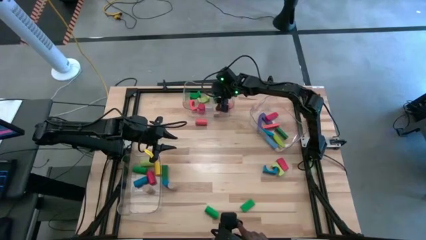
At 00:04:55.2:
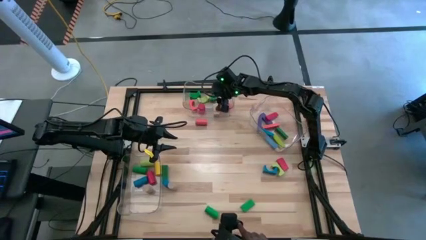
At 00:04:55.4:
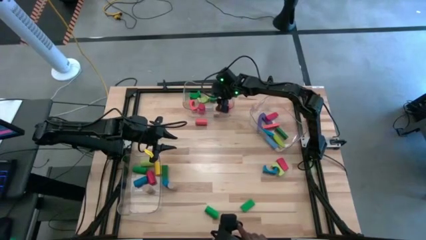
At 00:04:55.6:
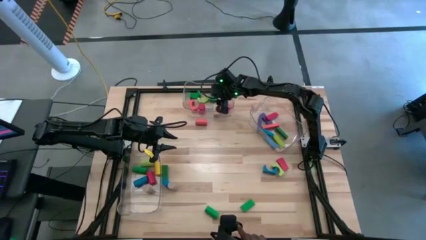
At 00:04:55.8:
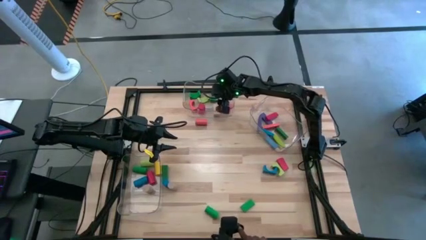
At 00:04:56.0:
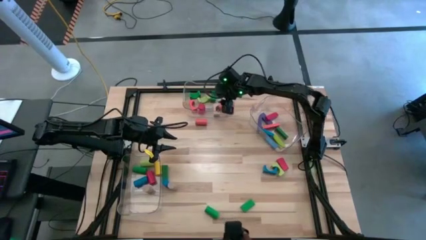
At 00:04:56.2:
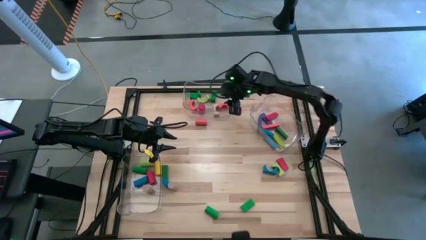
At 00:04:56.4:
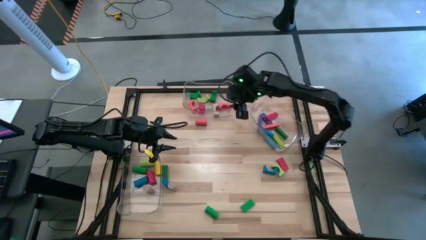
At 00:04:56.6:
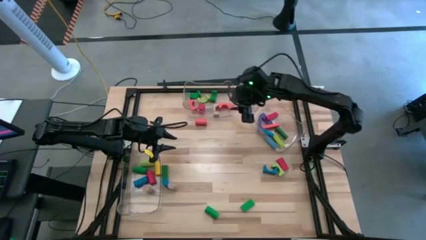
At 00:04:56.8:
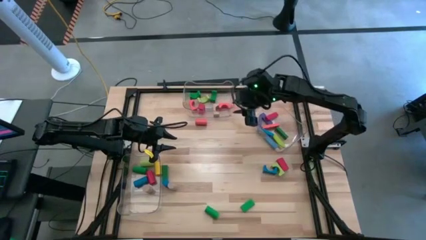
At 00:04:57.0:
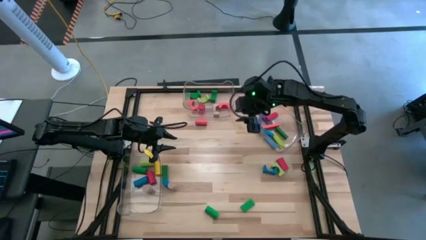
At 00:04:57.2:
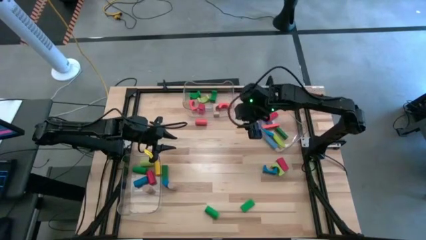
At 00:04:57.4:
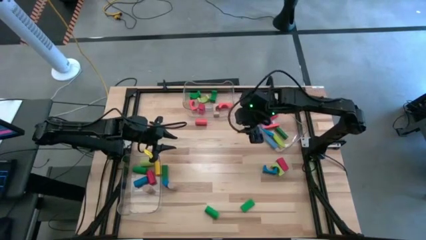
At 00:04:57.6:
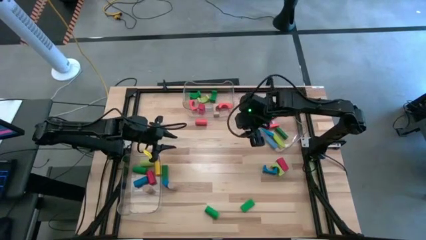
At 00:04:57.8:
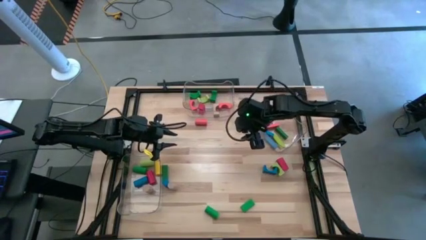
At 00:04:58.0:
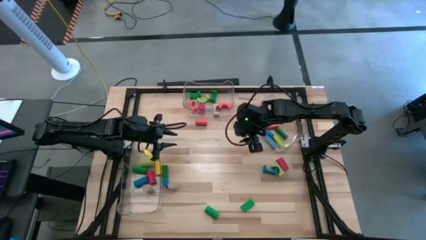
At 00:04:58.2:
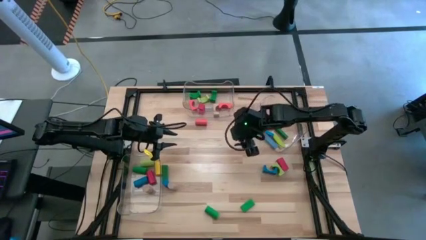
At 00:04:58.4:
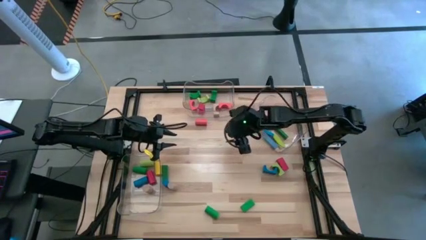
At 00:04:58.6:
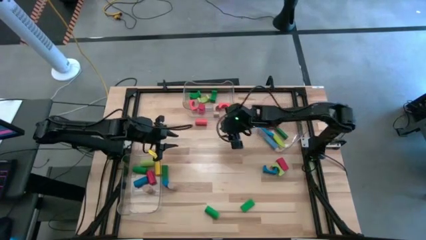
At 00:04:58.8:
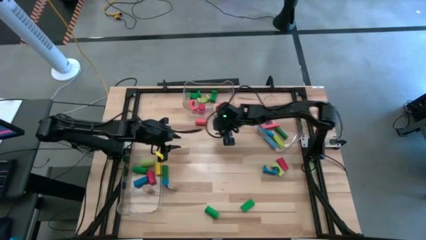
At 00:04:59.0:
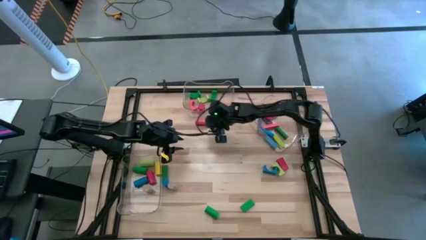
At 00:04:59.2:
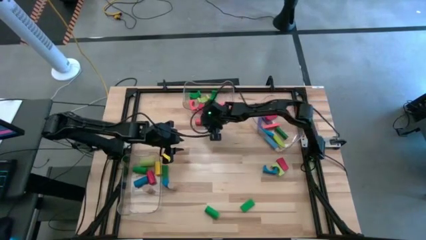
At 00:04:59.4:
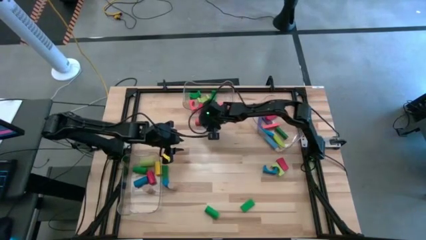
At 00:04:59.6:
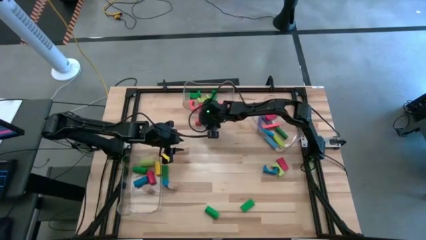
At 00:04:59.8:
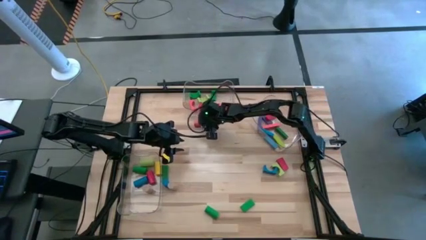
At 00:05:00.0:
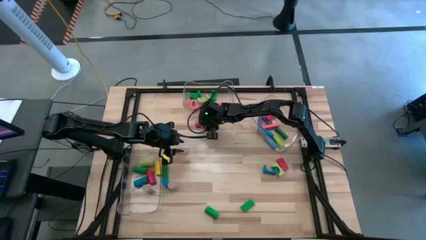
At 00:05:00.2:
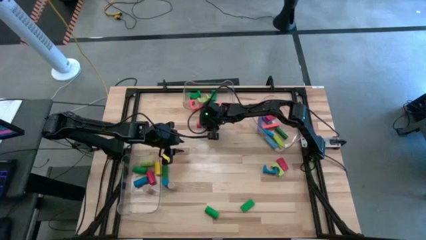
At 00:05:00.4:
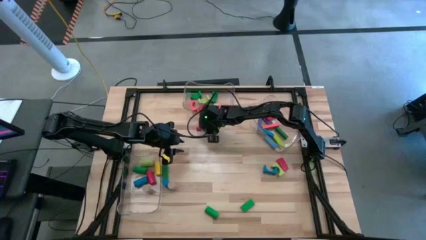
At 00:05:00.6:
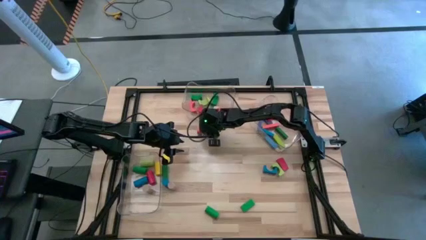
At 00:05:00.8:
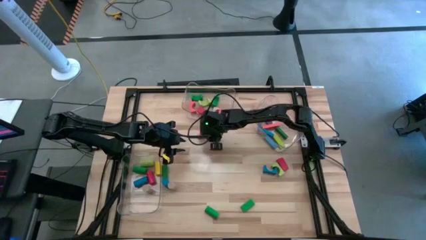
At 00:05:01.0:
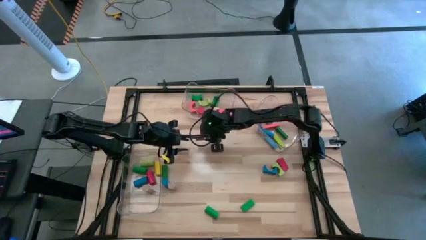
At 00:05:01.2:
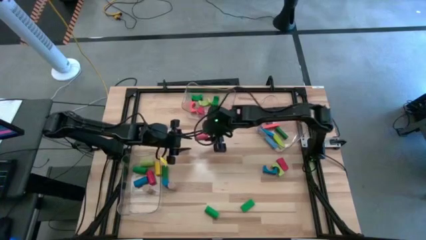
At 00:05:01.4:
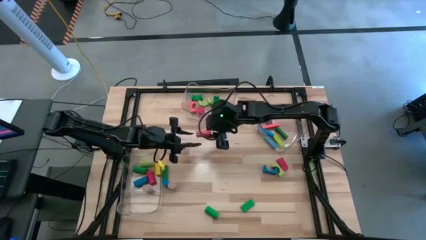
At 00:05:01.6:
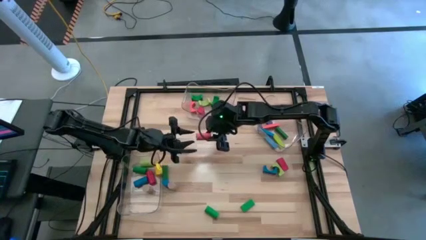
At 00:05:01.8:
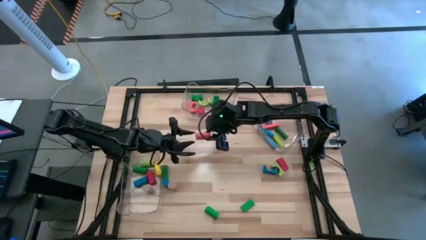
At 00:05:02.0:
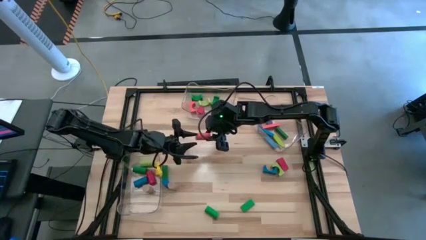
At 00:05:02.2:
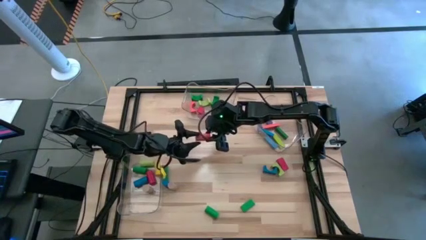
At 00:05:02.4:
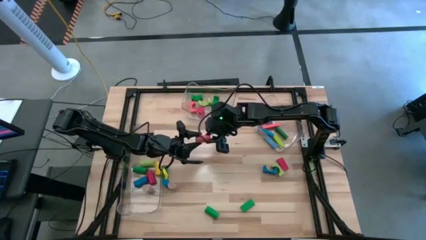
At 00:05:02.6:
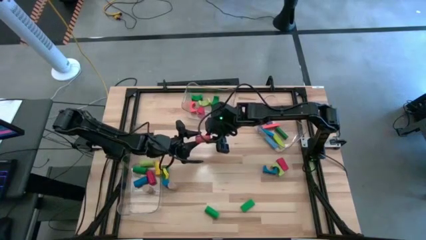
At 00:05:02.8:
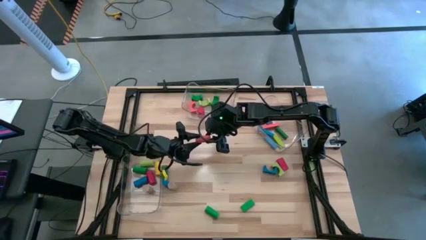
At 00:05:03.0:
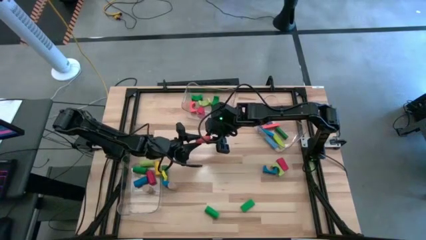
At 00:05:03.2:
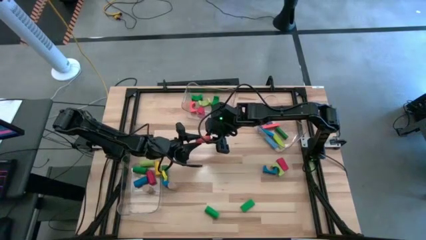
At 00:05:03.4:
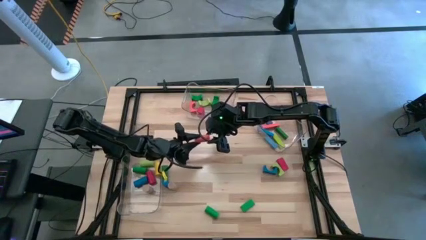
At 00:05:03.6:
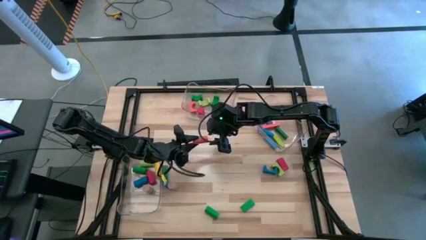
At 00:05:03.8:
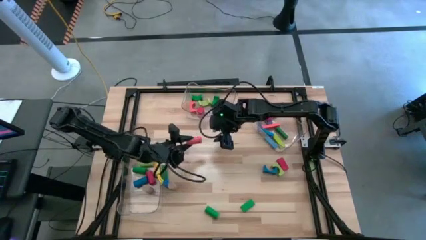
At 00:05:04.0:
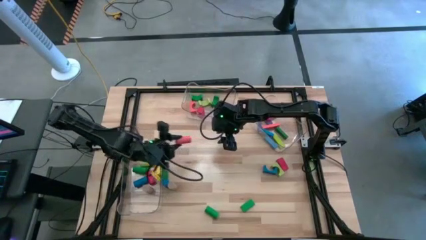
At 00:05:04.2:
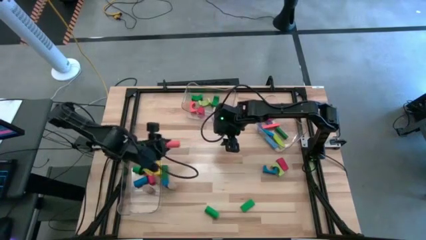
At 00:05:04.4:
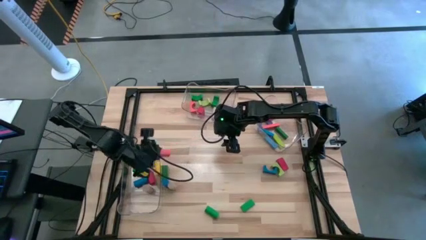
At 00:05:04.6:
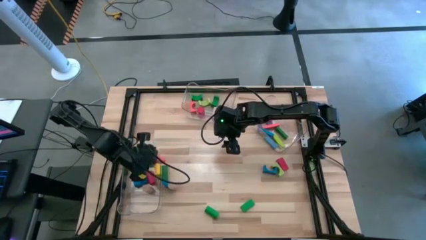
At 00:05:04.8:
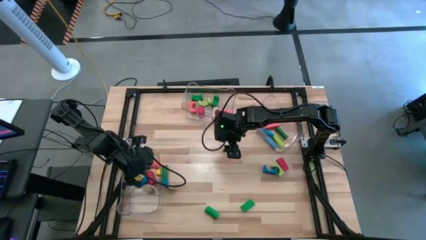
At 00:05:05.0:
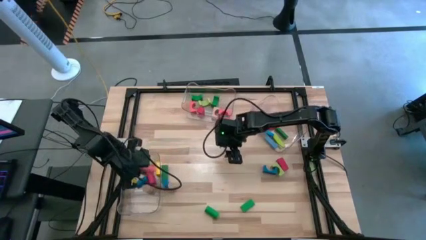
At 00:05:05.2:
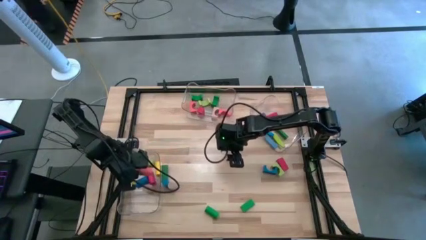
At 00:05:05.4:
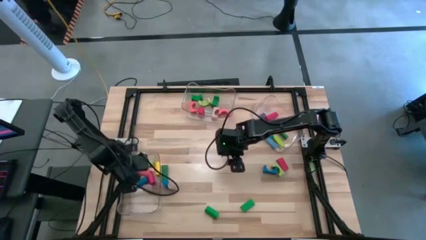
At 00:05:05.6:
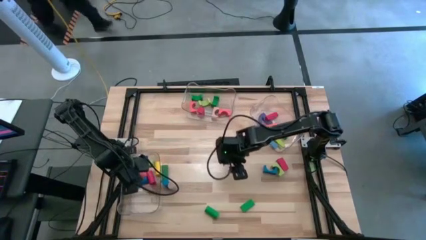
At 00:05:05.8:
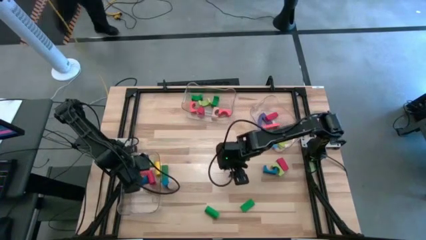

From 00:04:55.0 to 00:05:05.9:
Task: Sort blocks by size
Put the orange cylindrical block into the left transparent bin
